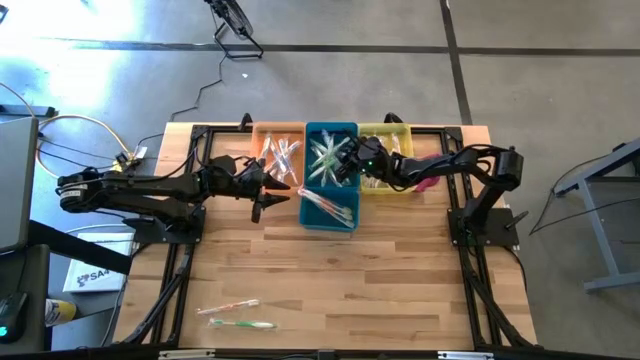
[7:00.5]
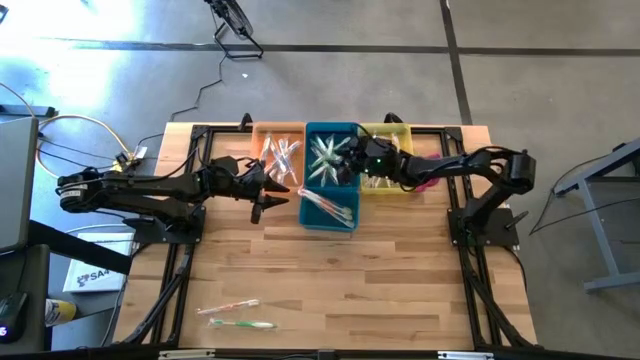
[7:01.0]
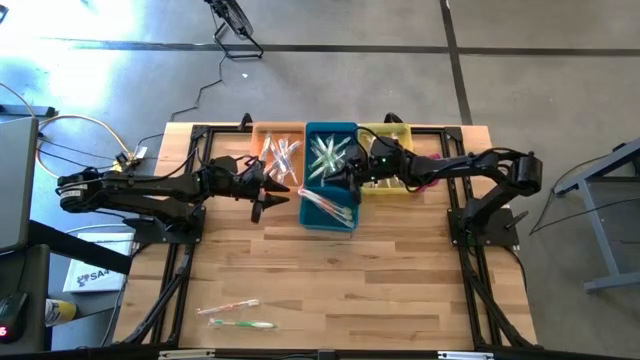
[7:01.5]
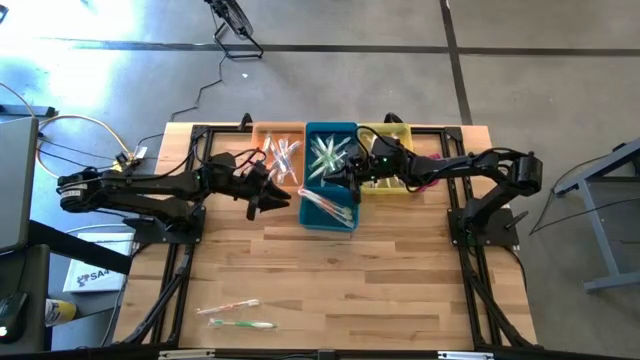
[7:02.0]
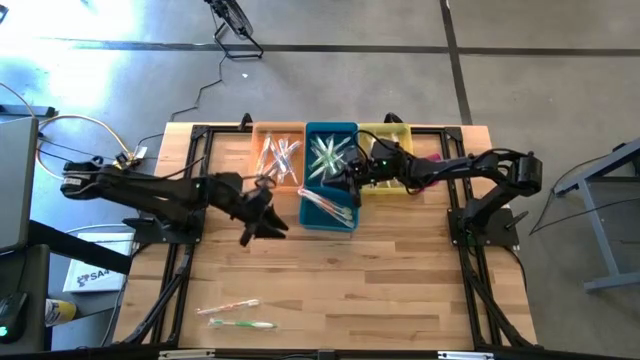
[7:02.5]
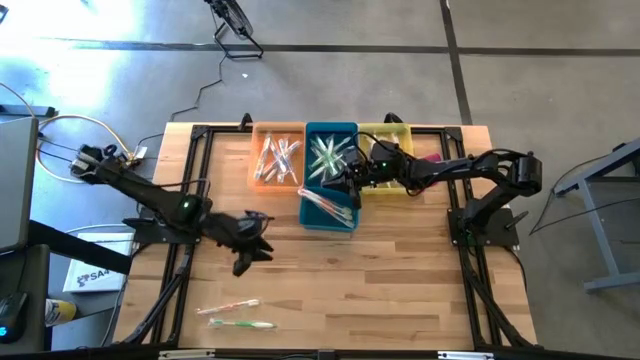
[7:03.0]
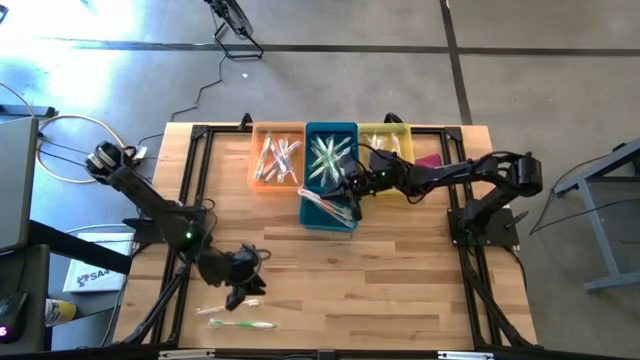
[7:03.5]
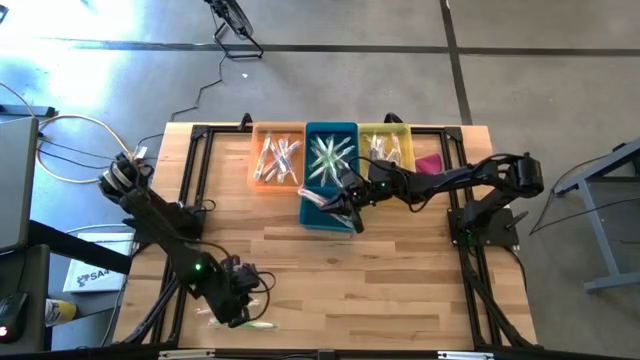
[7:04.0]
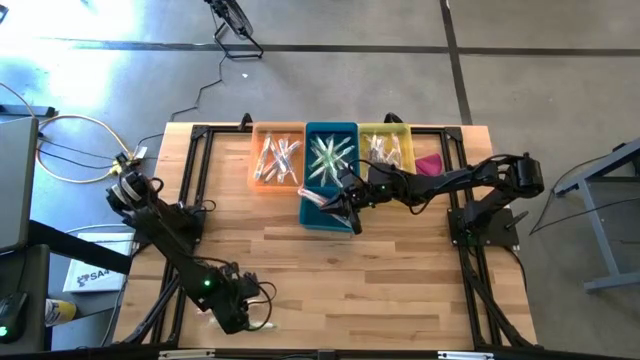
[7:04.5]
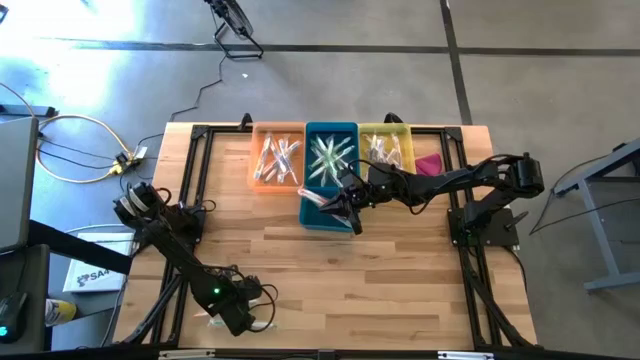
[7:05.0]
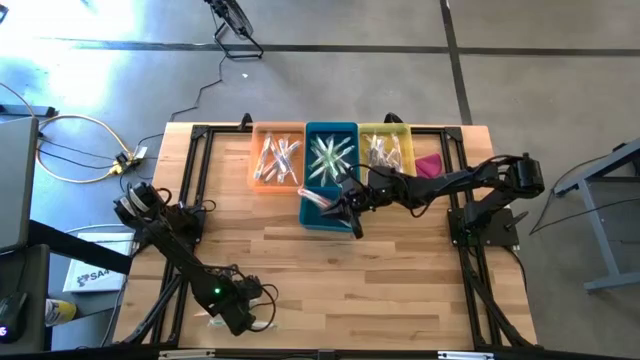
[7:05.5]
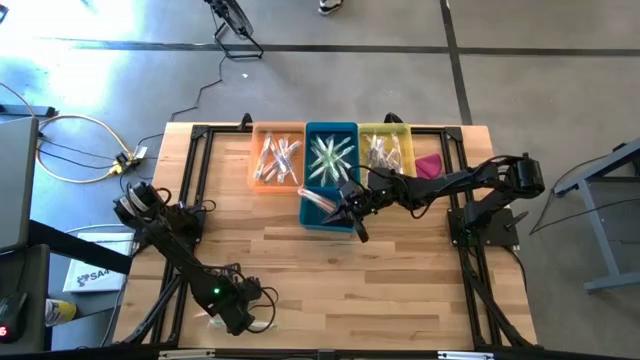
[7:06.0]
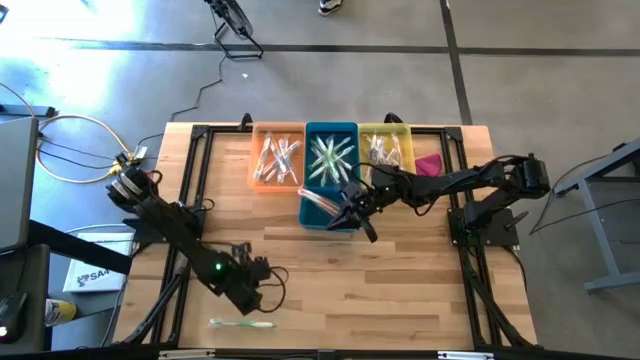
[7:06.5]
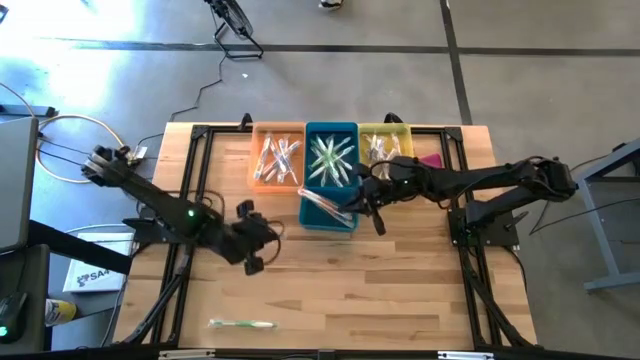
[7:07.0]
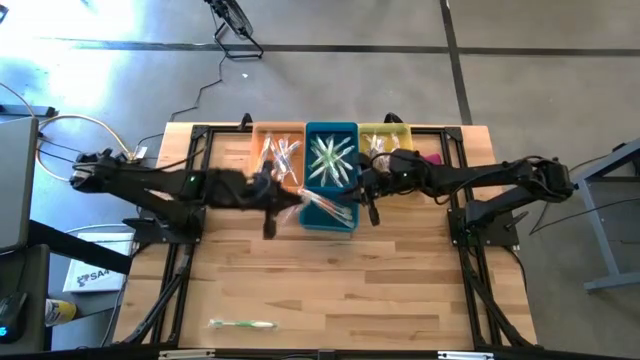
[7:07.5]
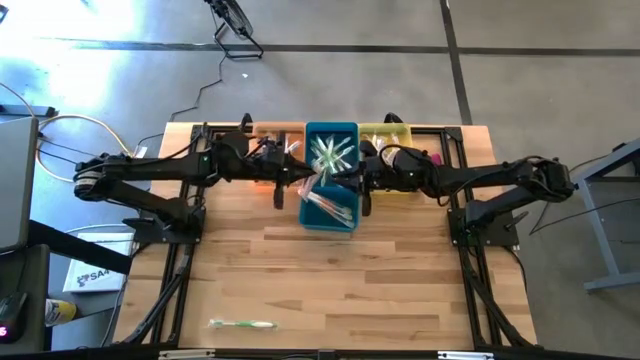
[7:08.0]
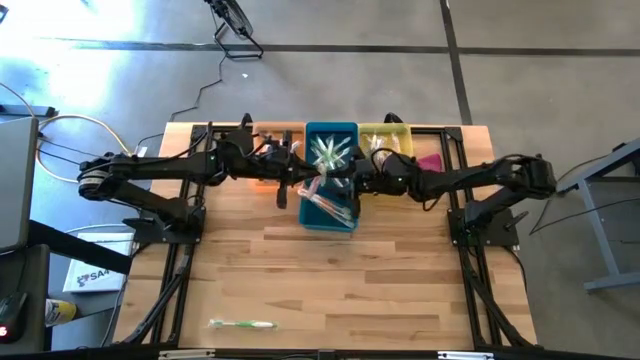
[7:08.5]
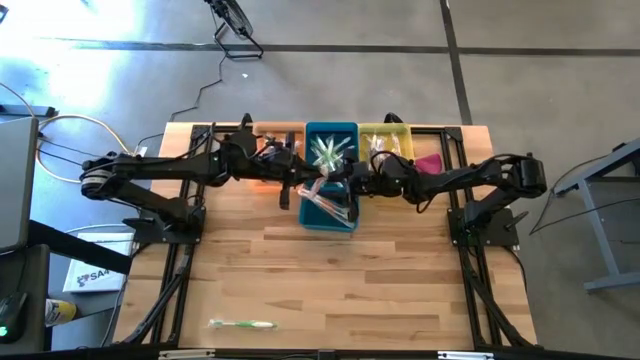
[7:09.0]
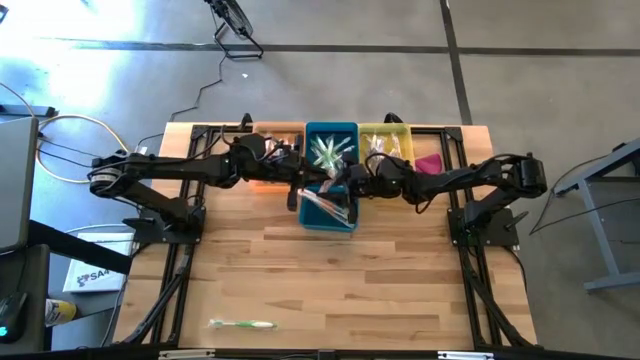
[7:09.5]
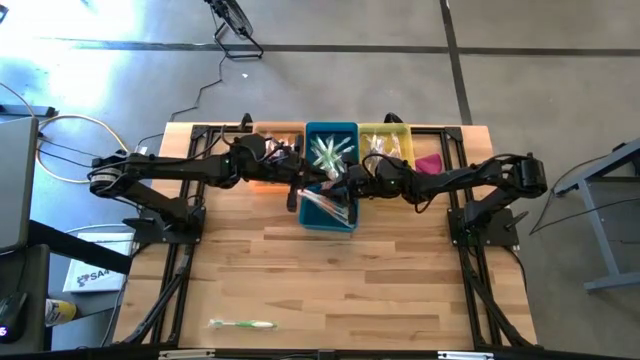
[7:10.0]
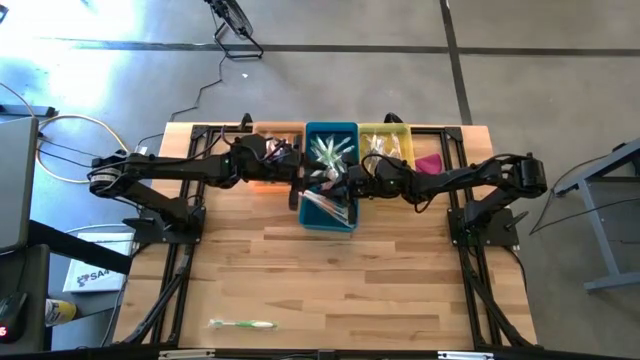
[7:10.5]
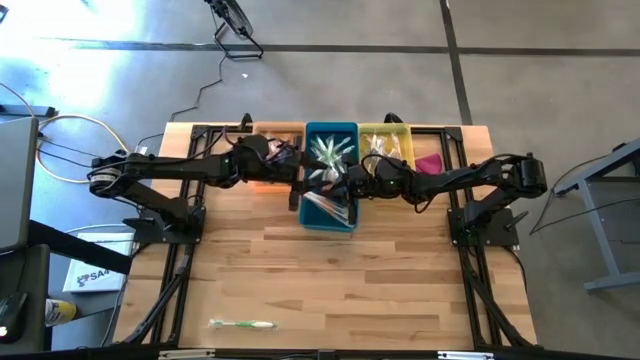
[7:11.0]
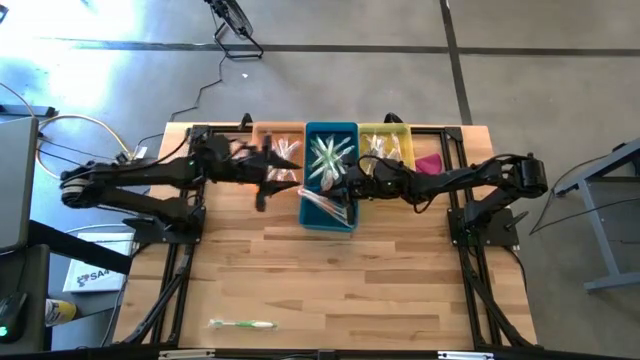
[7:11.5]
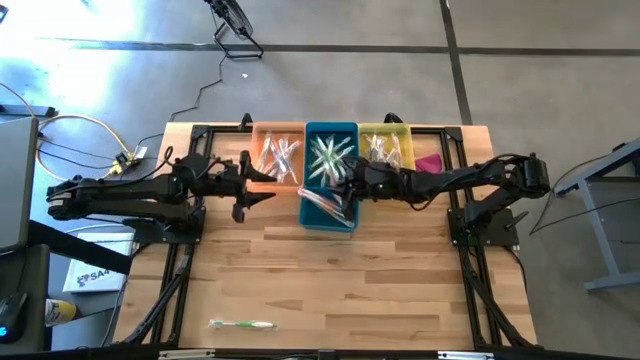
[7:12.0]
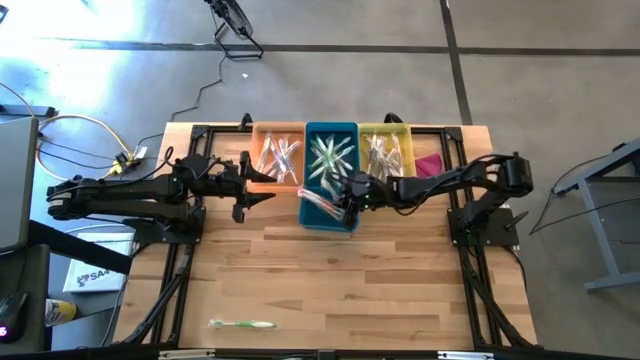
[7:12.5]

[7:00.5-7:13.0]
Task: Pick & Place Toothbrushes
Put the orange toothbrush into the bottom blue bin

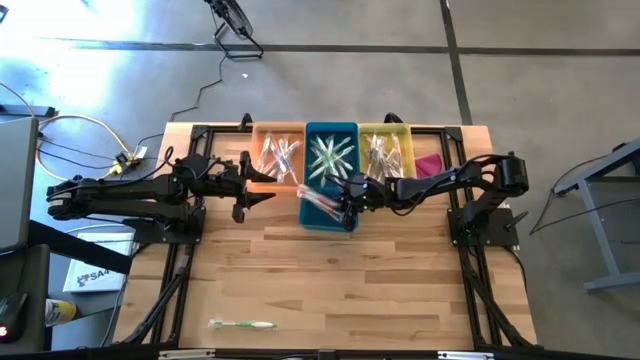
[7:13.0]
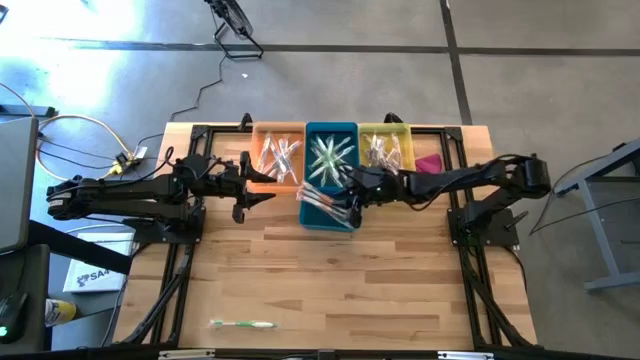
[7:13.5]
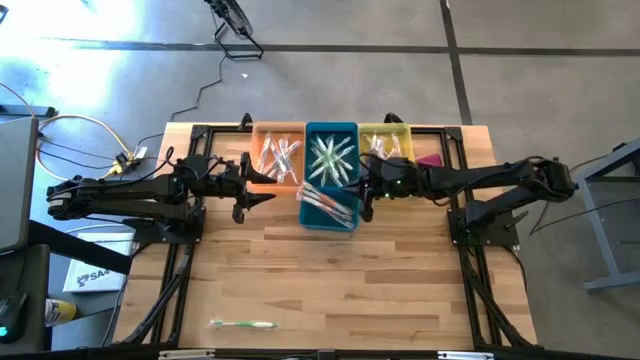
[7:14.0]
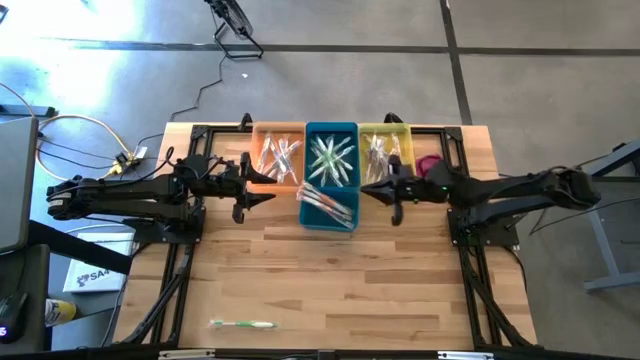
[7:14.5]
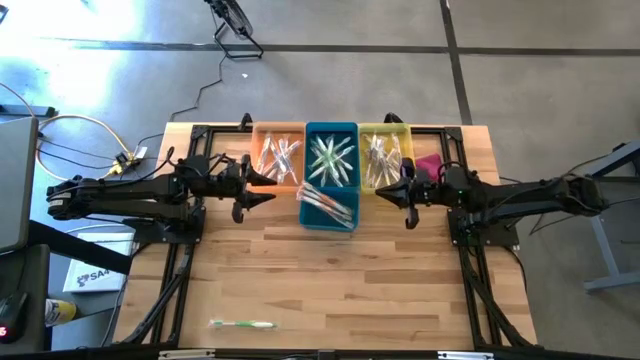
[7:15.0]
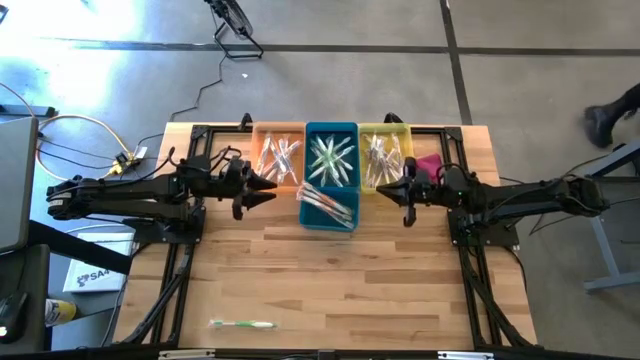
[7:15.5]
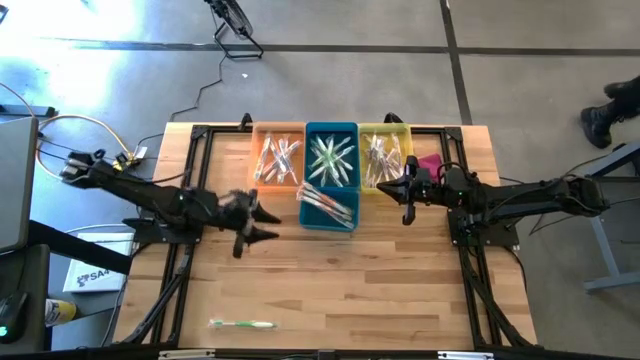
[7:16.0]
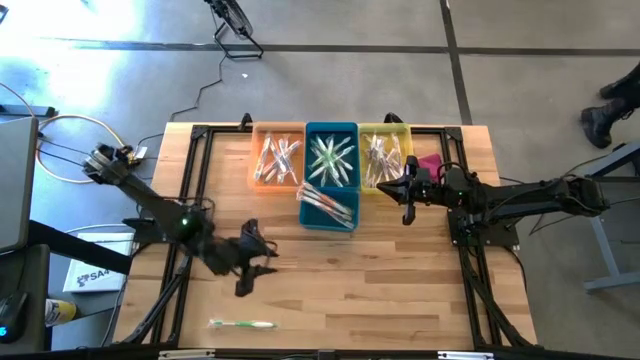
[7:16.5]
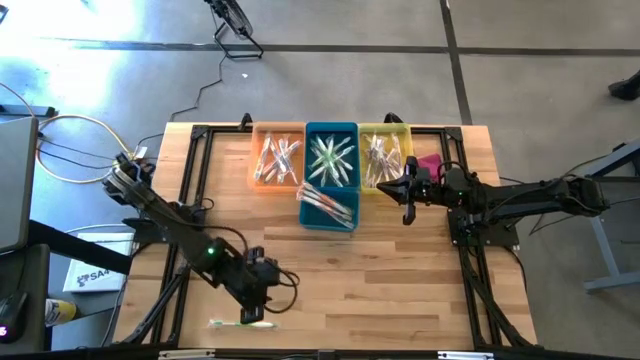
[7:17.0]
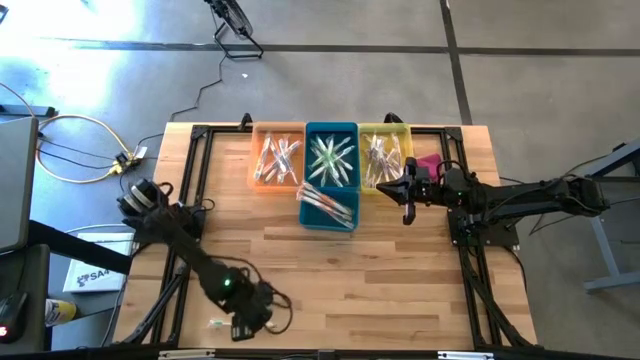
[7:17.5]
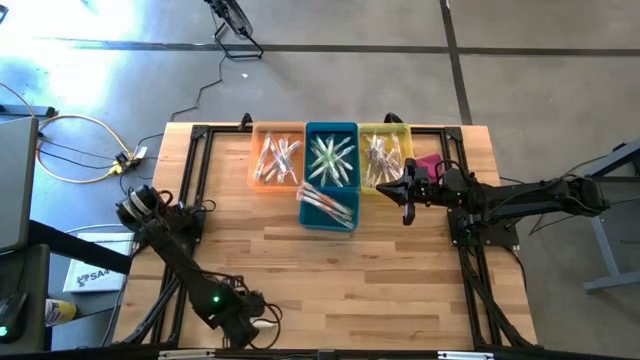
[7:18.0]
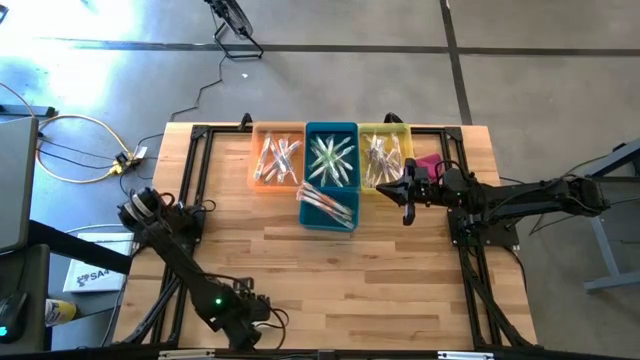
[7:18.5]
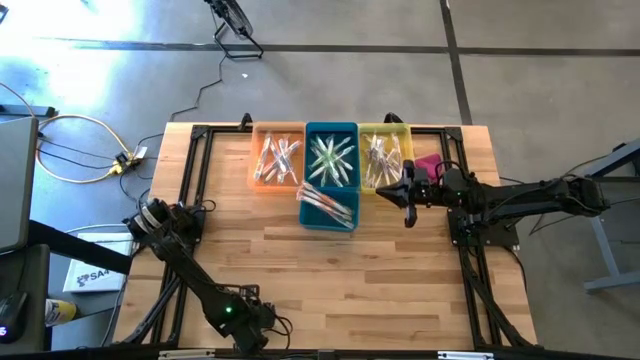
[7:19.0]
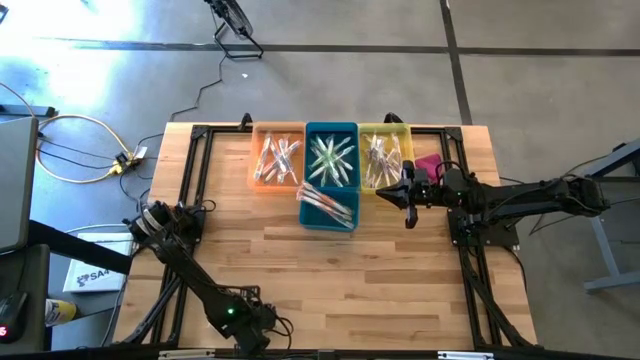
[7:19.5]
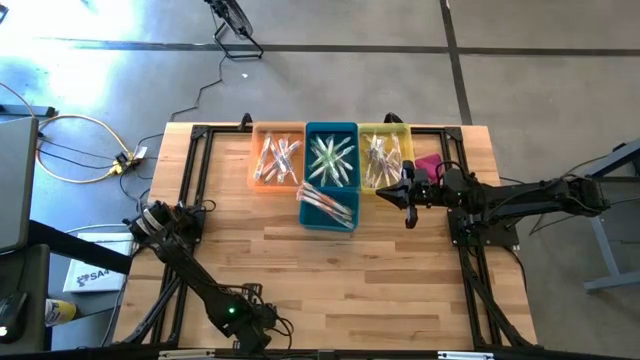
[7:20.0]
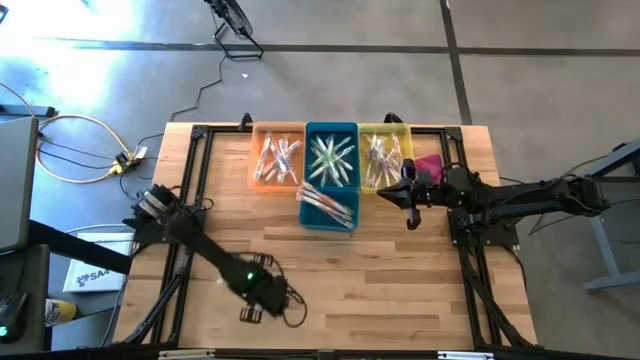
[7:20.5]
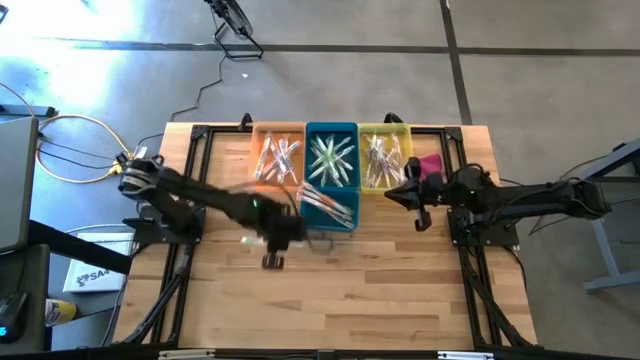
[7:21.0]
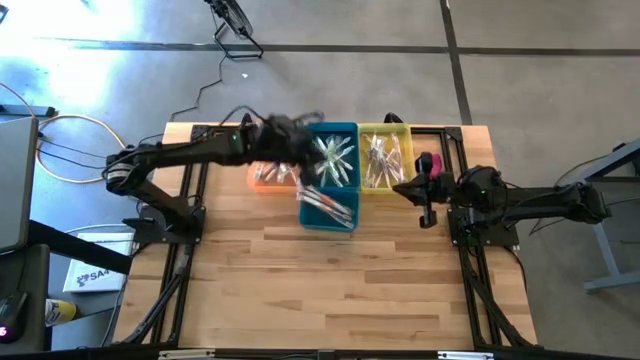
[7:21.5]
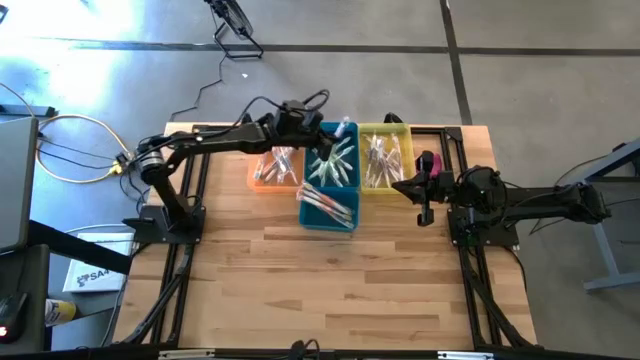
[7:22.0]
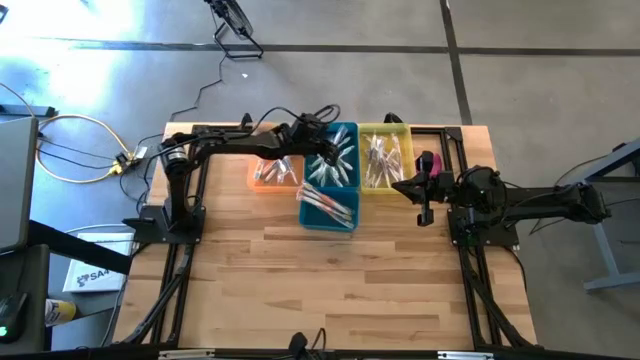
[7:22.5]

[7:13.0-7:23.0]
Put the green toothbrush into the blue bin
